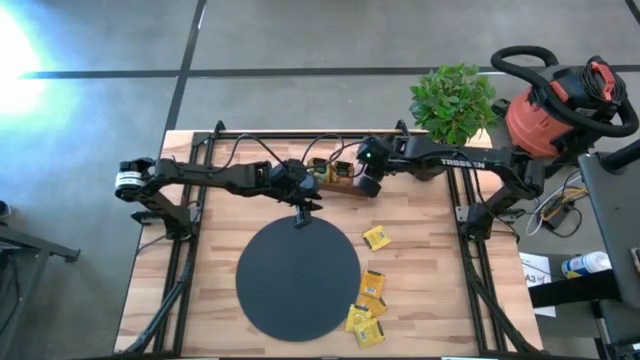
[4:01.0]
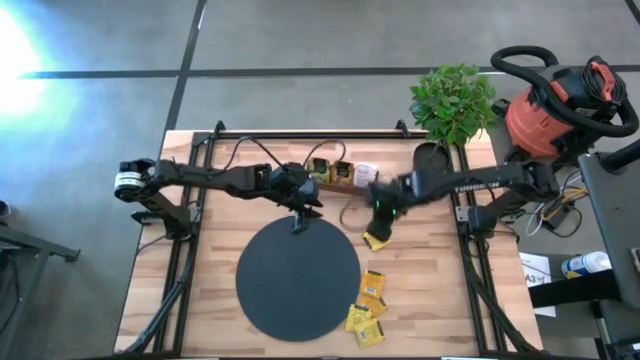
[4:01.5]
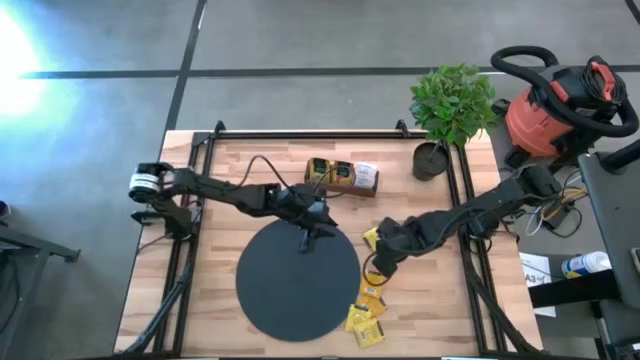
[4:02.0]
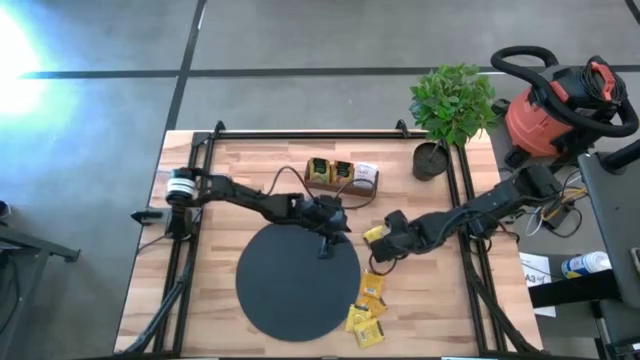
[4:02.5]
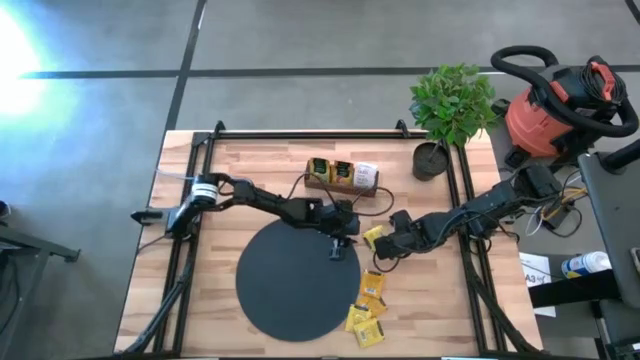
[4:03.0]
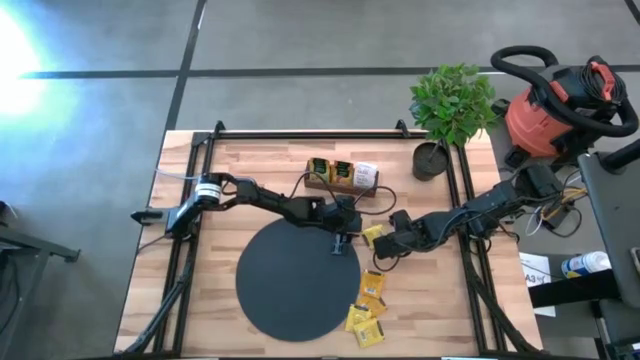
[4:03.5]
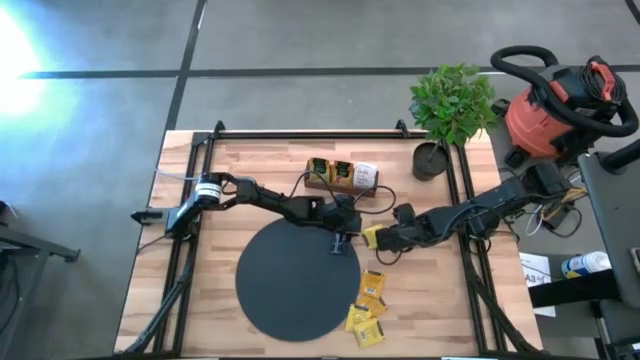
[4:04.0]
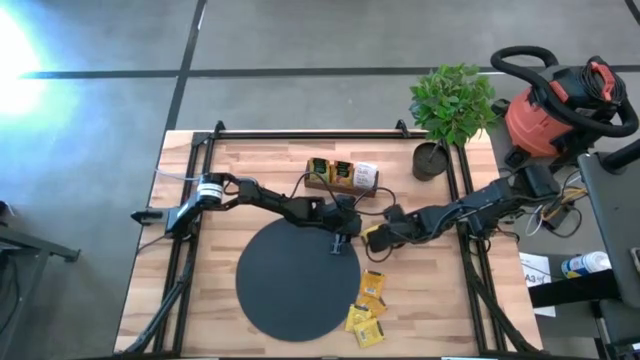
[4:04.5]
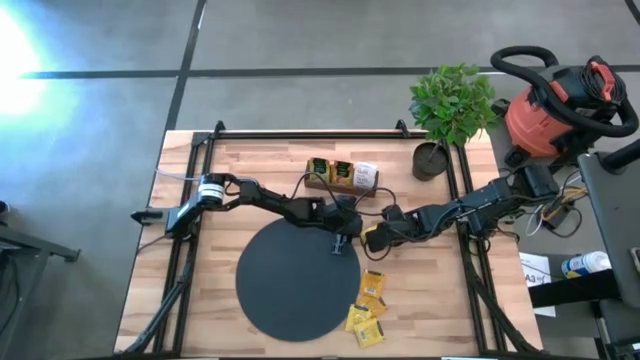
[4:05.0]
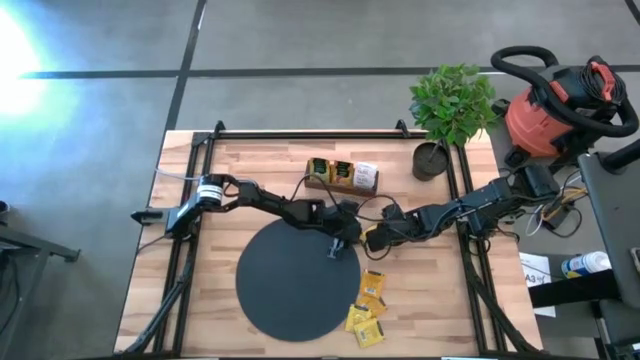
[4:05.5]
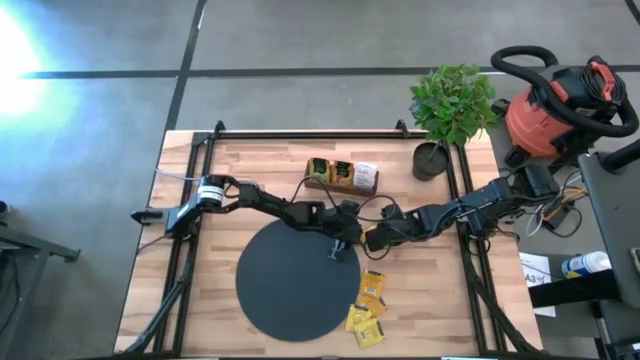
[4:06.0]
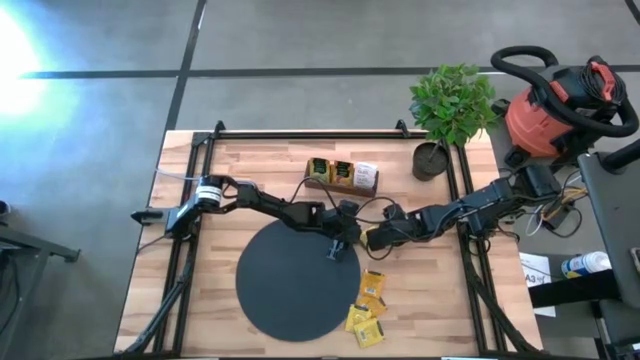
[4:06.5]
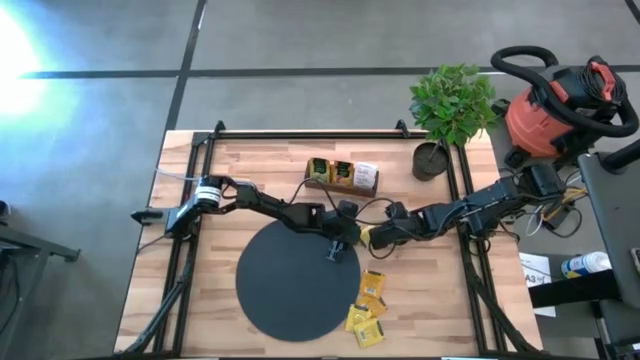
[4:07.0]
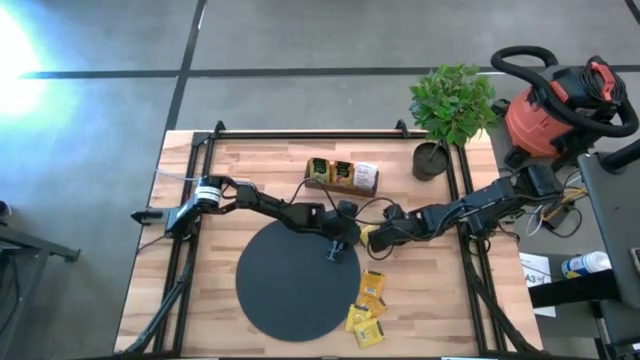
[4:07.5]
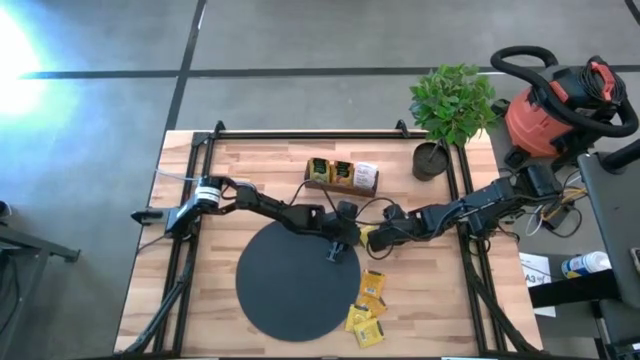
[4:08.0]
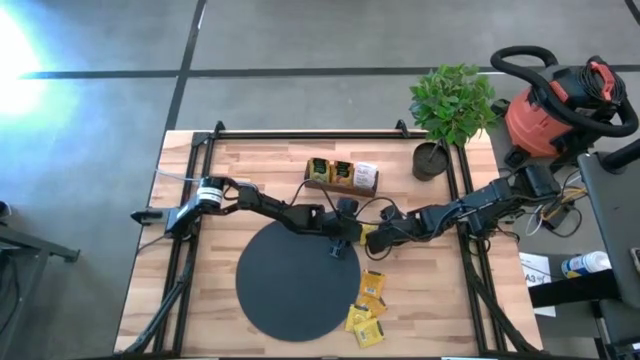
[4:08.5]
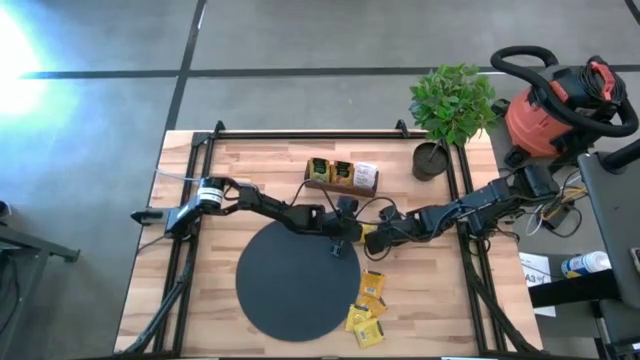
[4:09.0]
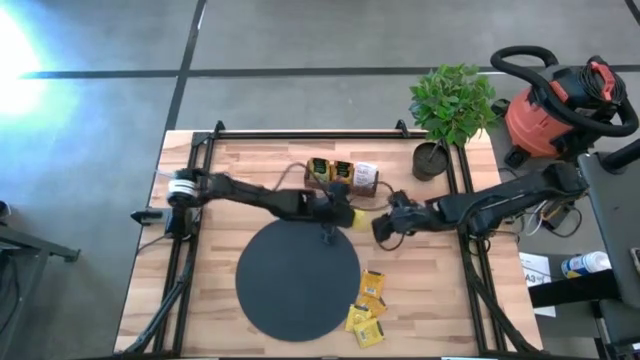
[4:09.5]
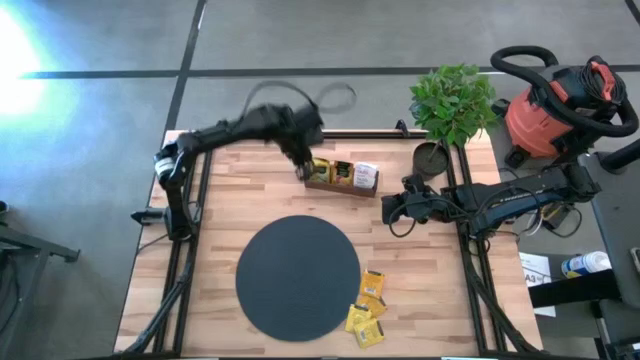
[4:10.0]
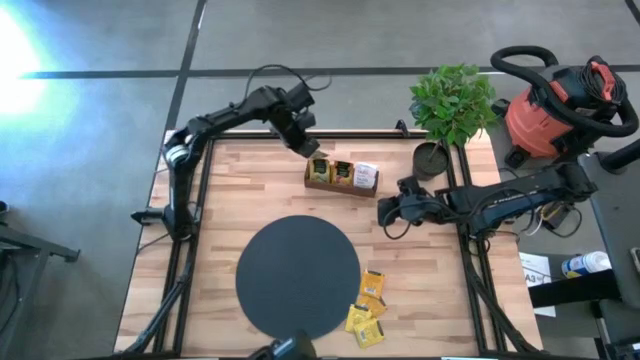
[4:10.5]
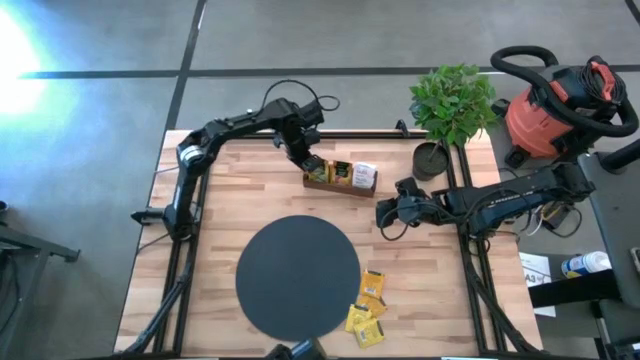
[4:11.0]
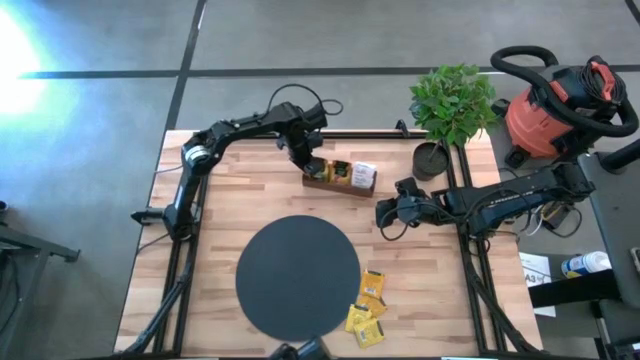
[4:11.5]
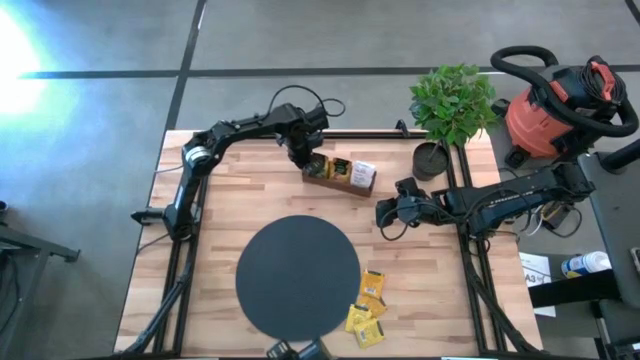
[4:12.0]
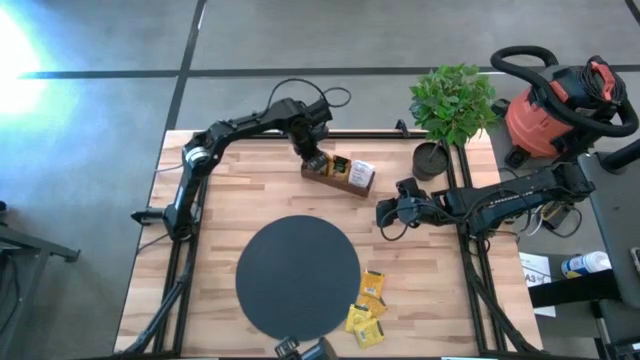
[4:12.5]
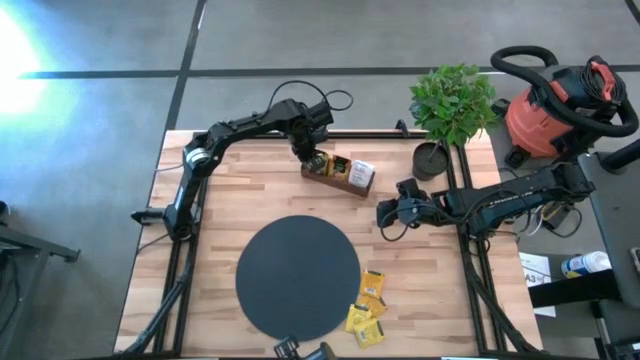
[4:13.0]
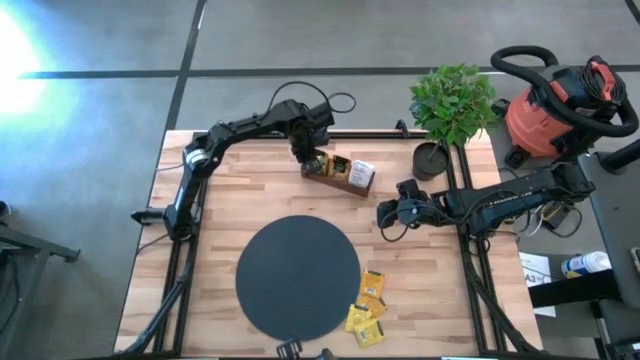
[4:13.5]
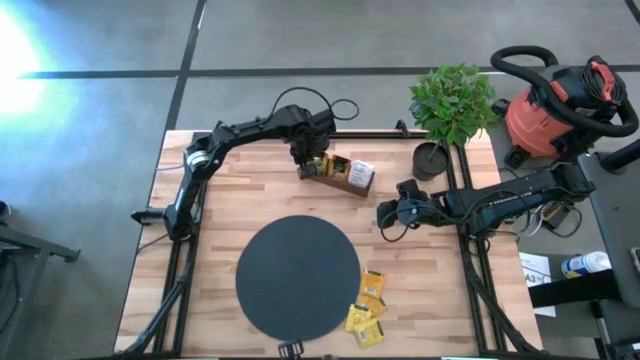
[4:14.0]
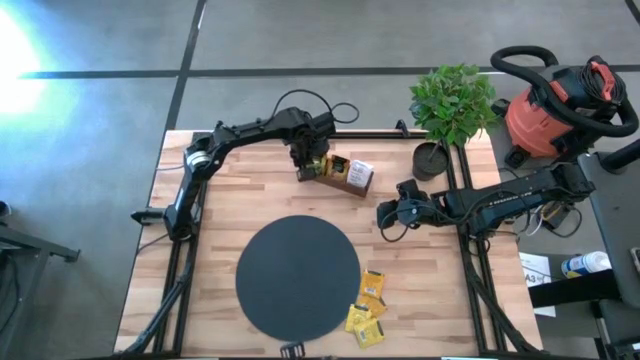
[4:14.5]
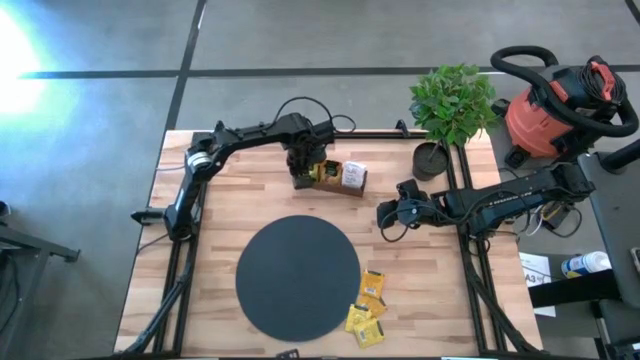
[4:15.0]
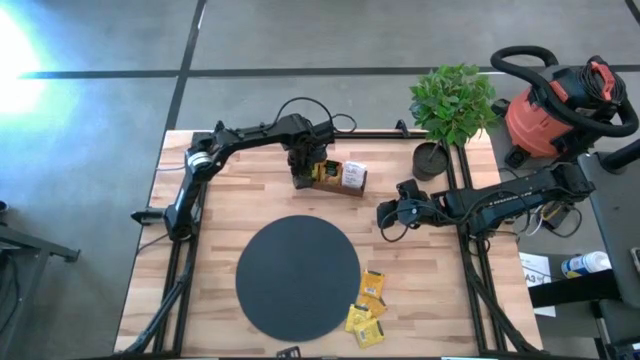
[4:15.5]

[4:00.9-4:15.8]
Task: Pick & Place Tea
Put the top yellow tea bag into the left section of the wooden organizer

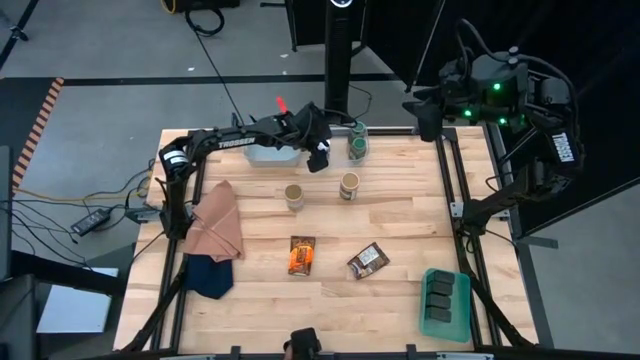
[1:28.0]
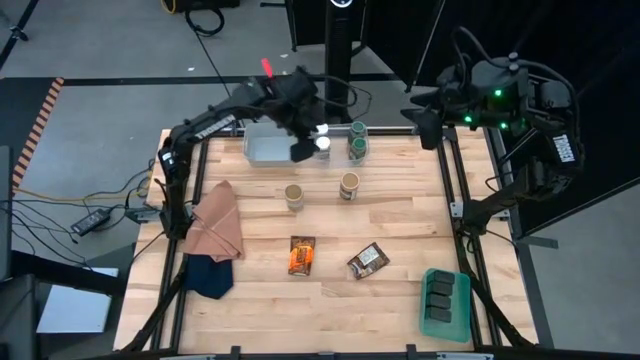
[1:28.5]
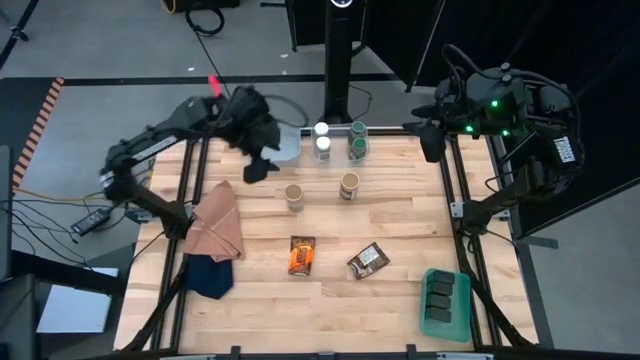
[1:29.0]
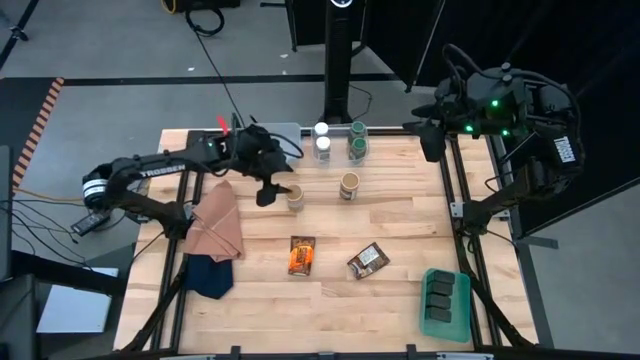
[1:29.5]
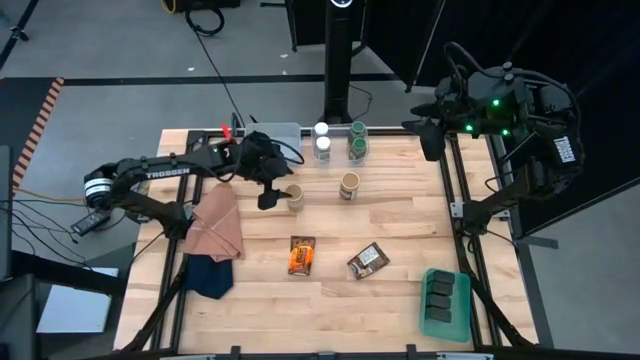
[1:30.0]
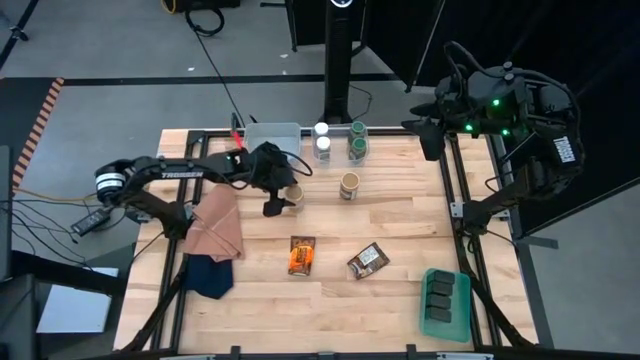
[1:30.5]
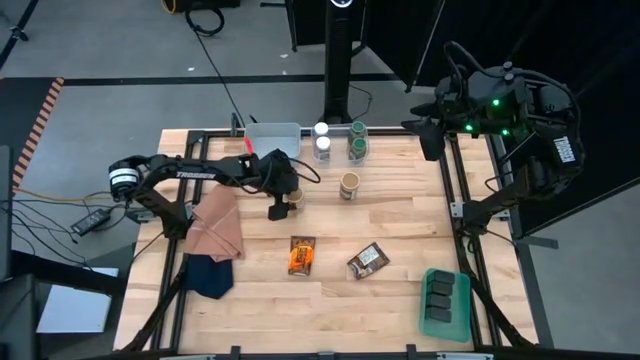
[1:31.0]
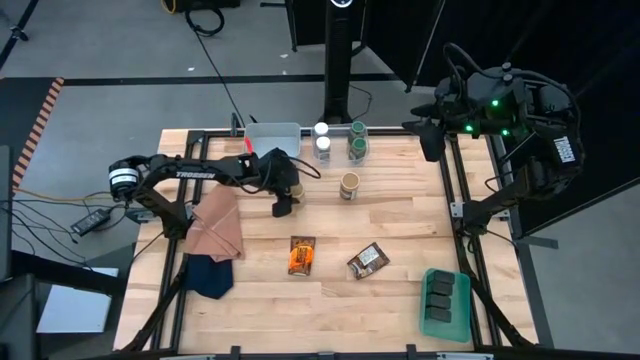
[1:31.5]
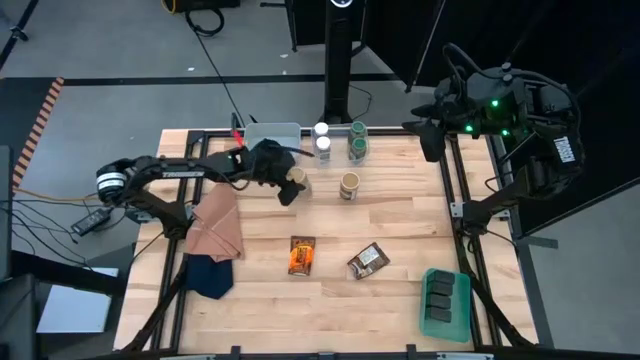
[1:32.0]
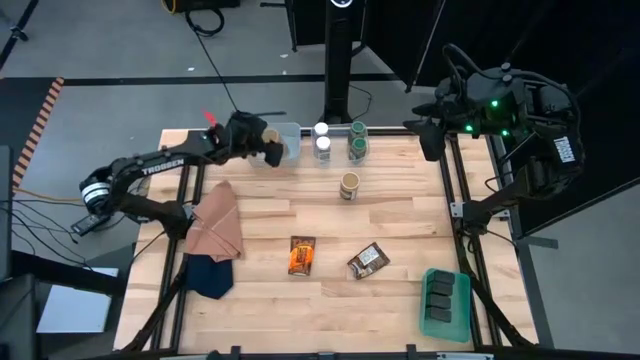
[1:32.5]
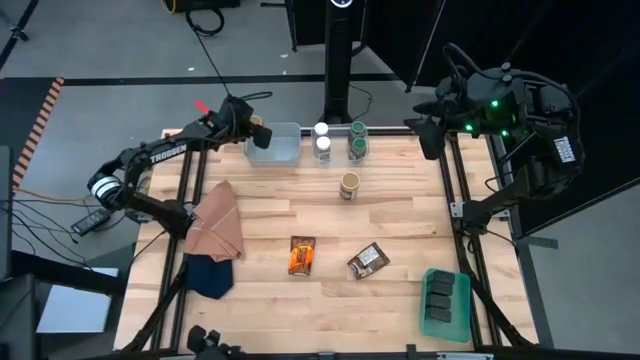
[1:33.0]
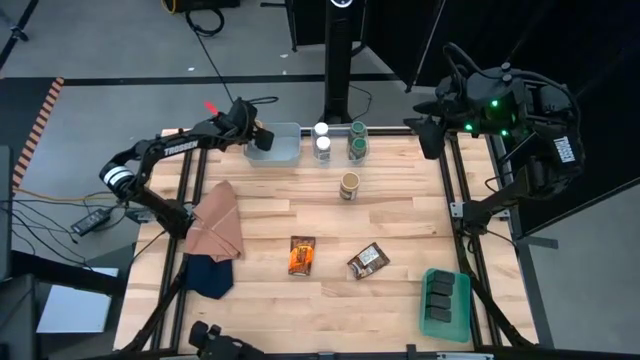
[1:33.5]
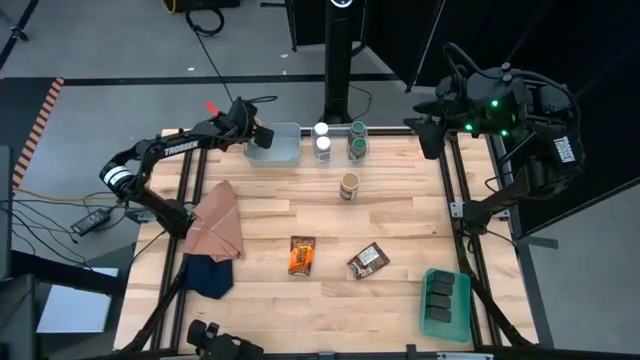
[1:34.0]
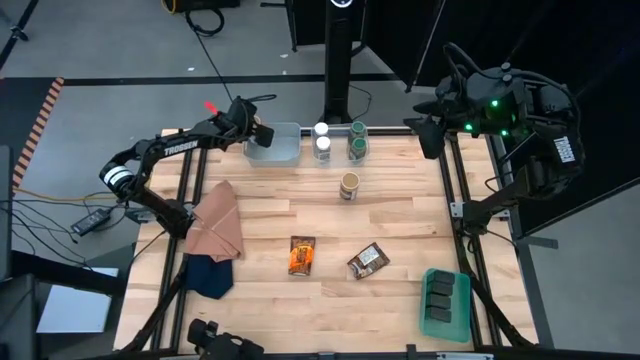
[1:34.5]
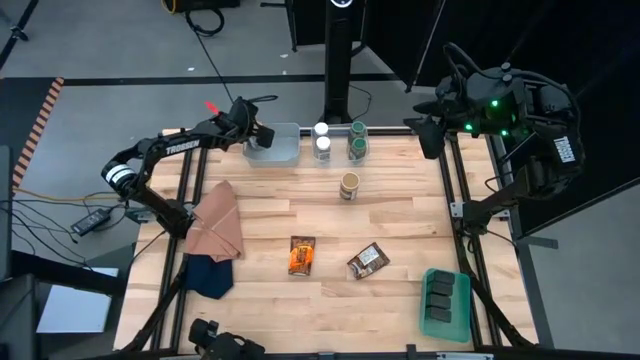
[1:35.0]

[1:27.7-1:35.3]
Task: Sort spices by type
Put the left gold seasoning bottle into the gray bin
